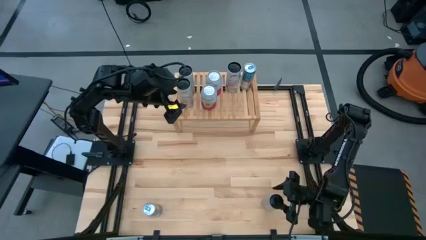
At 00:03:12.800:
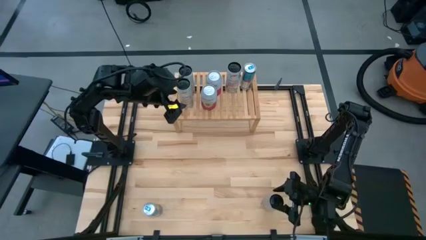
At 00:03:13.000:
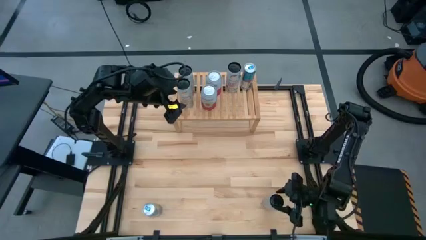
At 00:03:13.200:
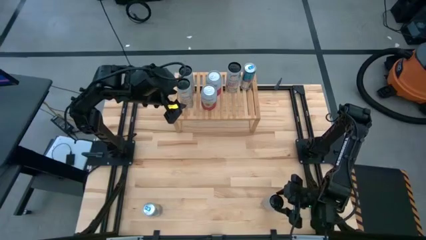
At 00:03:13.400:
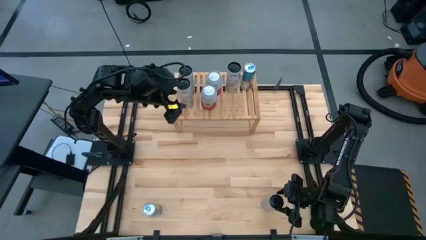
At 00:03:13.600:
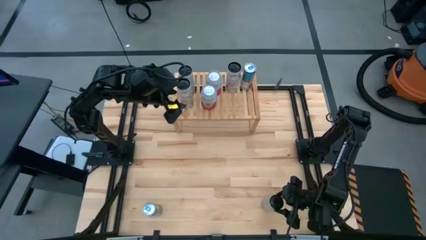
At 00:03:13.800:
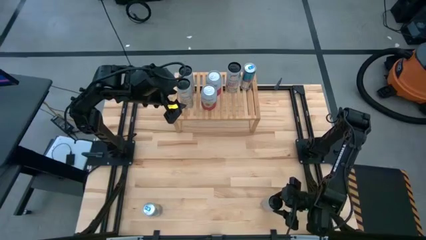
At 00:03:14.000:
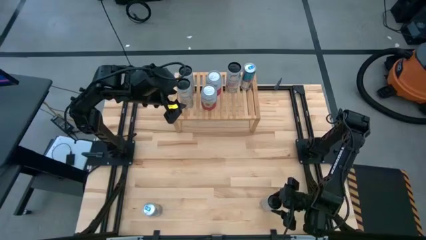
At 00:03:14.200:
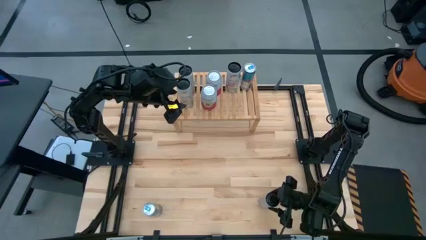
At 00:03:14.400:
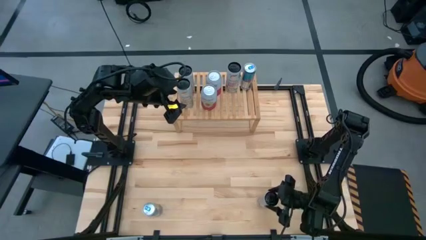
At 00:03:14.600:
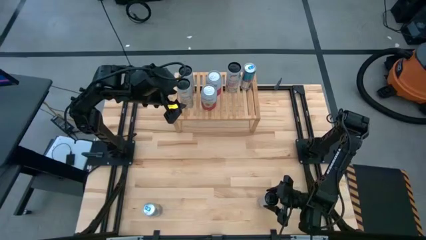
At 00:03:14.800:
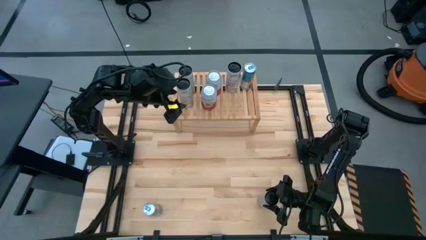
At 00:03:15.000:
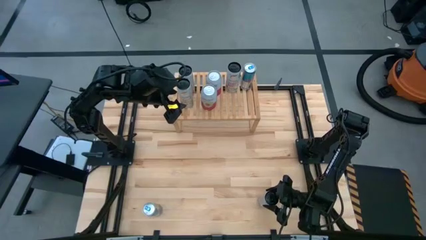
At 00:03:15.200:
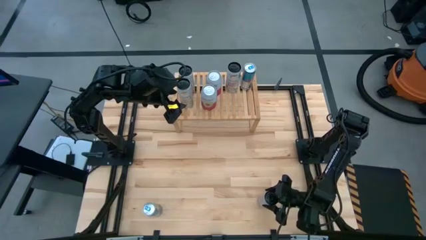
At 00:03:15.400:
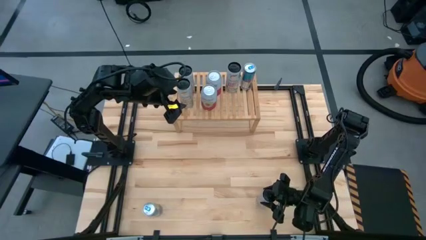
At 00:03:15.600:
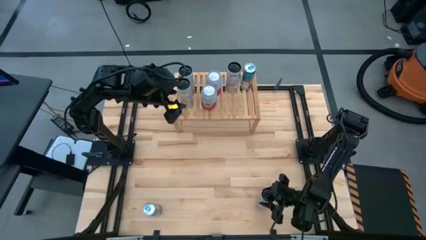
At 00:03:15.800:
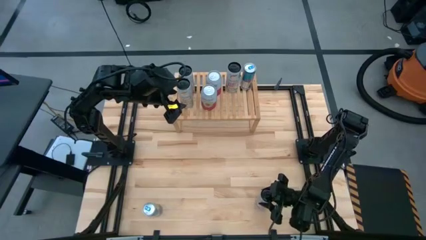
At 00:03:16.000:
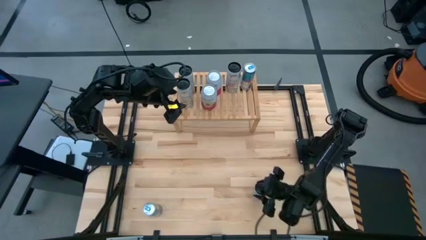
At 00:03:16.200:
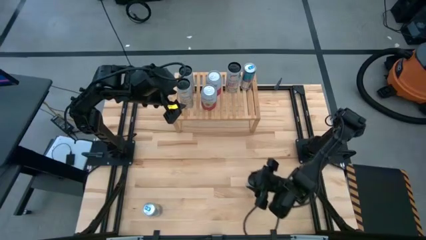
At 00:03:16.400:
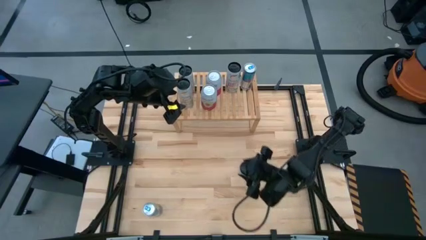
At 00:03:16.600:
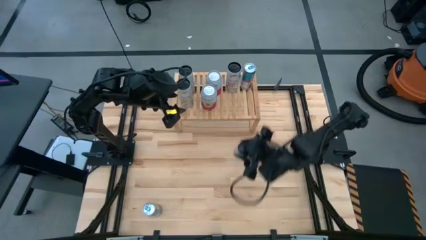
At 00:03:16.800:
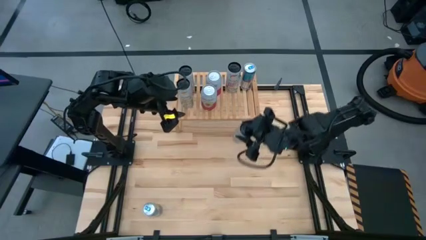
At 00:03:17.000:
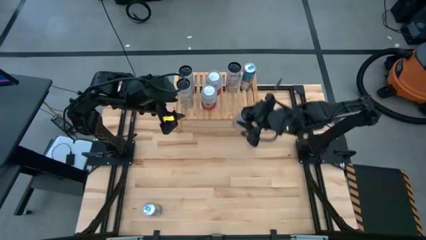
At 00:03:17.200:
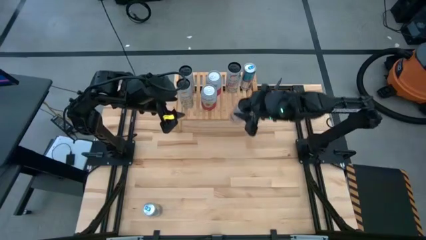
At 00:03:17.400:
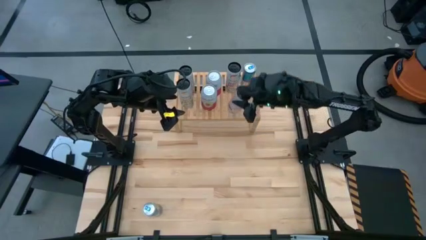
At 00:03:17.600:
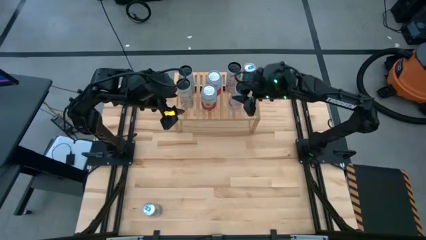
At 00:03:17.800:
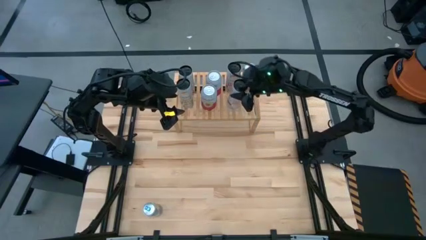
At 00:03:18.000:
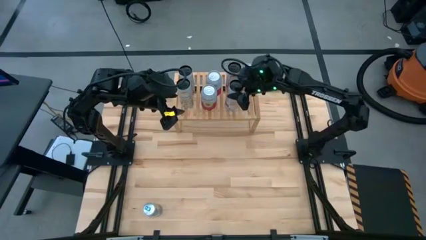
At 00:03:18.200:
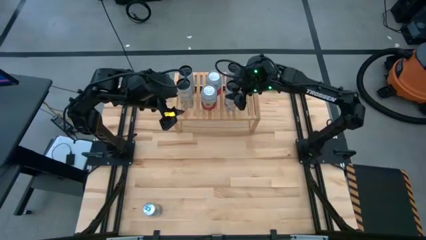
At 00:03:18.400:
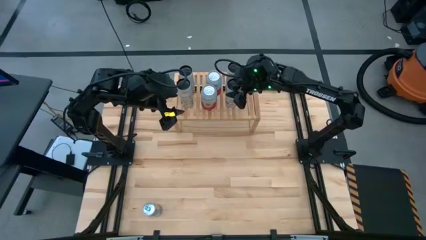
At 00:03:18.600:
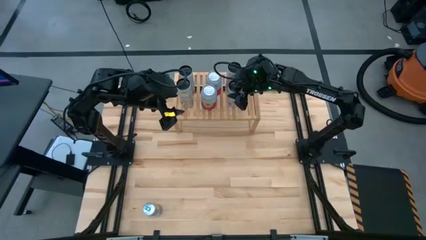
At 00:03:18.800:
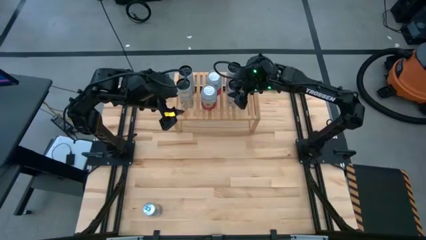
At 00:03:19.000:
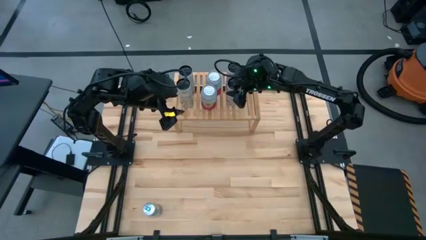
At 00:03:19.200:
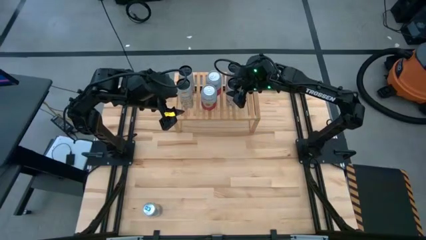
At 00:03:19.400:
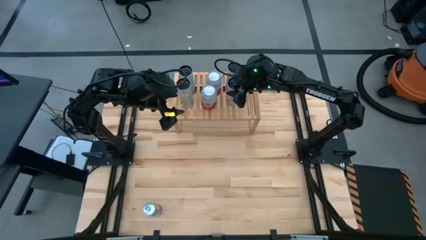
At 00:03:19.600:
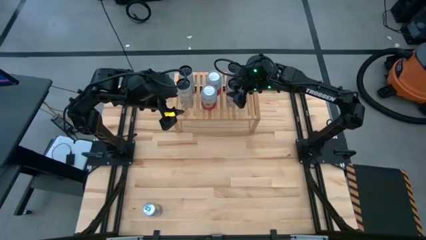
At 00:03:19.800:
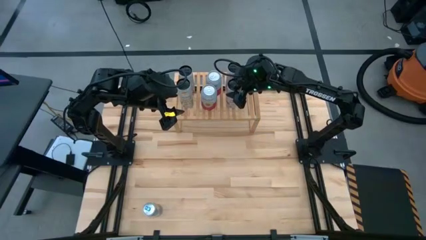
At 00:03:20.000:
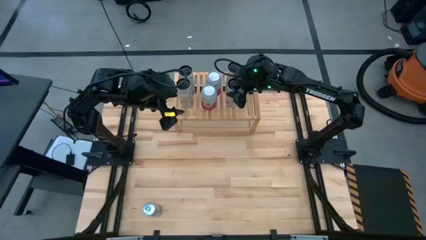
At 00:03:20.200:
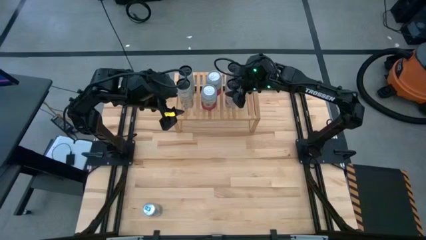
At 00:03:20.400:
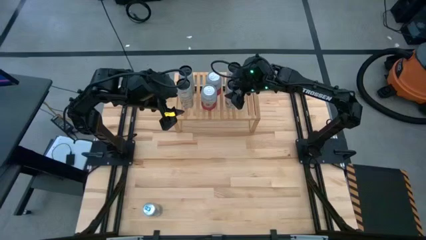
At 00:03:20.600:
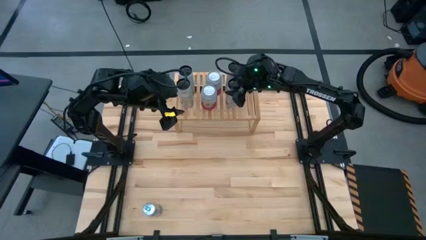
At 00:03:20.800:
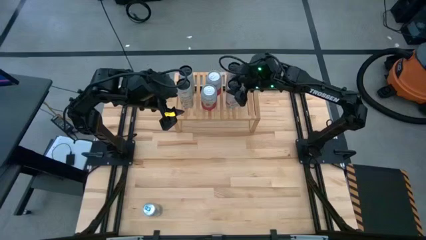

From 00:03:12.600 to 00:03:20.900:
Task: Place canned beverage on shelf
Put the white pink soda can on the shelf aligned with the other white pink soda can
